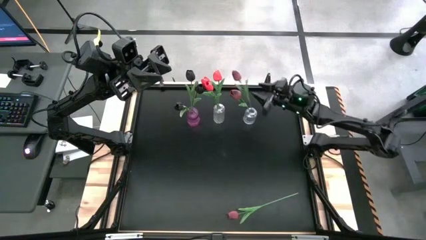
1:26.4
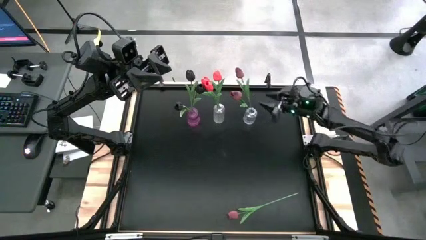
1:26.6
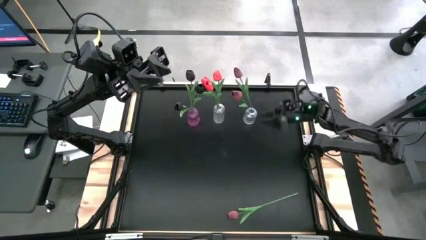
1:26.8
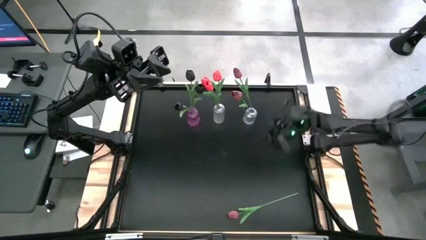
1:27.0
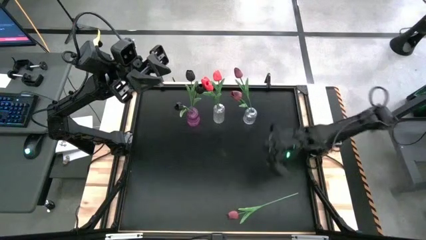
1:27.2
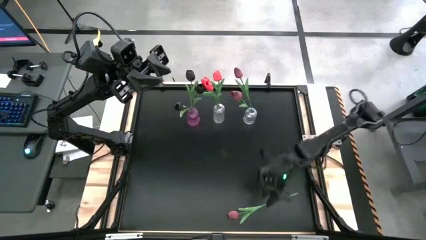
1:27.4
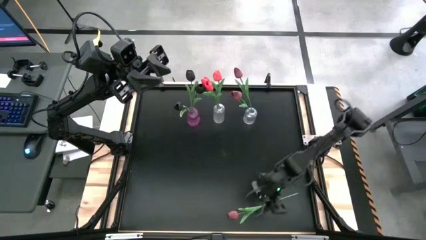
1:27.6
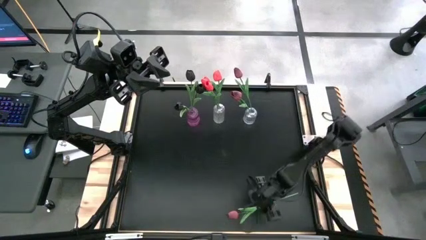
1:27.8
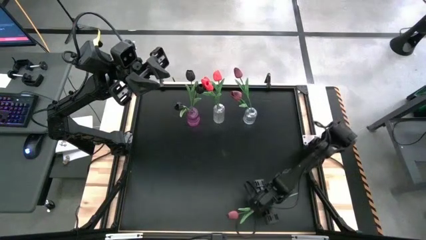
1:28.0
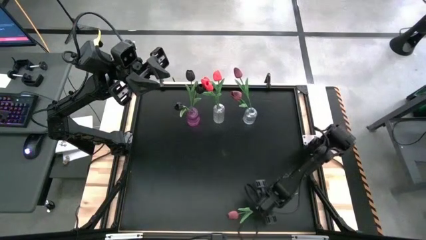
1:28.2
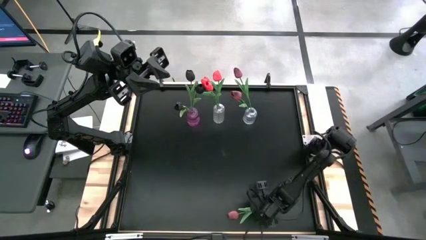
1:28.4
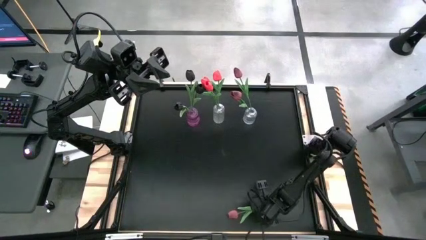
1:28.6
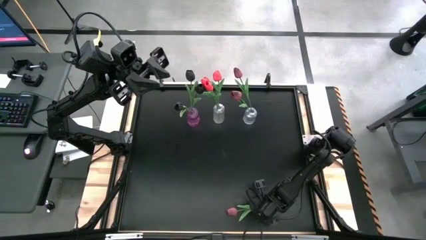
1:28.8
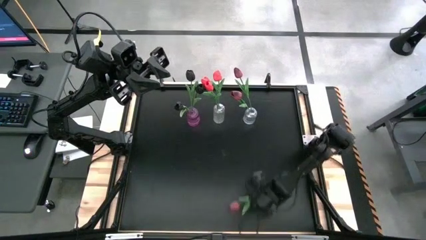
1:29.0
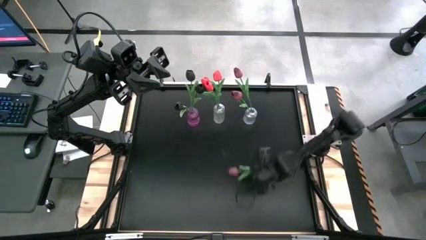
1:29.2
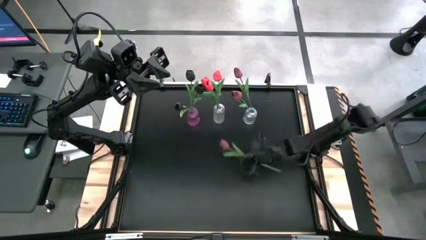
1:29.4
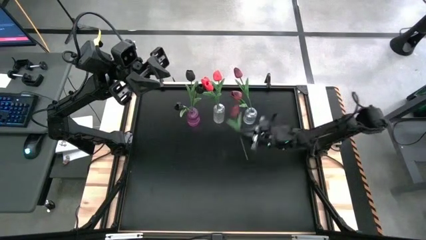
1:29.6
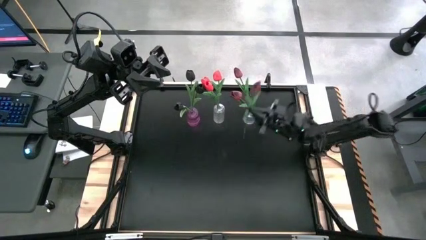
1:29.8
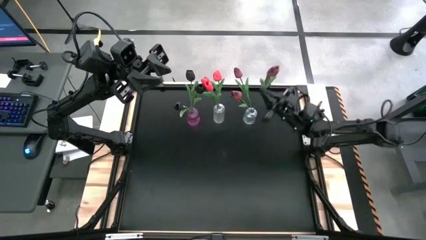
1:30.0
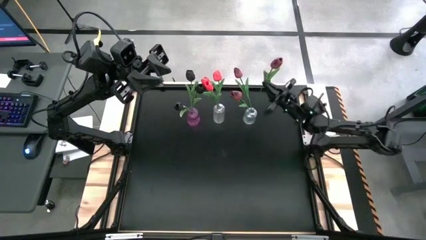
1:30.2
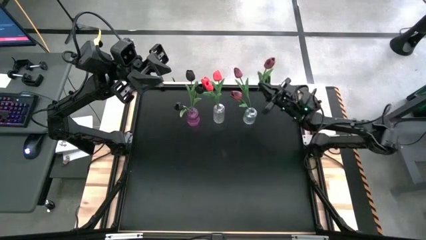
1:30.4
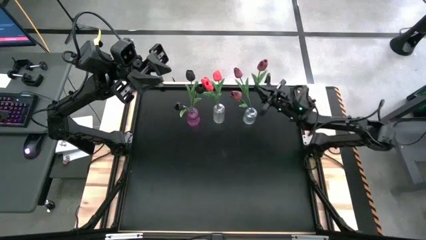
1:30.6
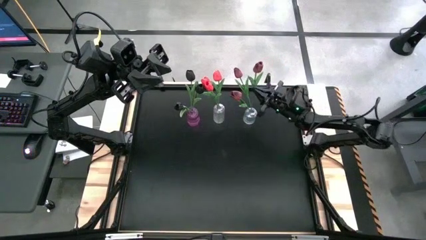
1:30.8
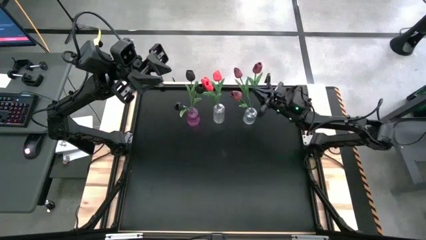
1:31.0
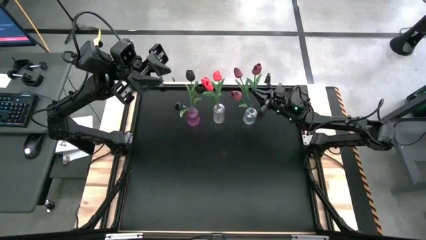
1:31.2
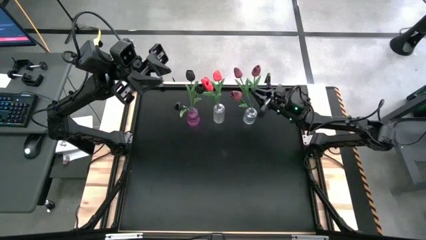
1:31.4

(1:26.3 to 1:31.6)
Task: Sort flowers into vase by color
Put the dark red tulip into the right transparent vase

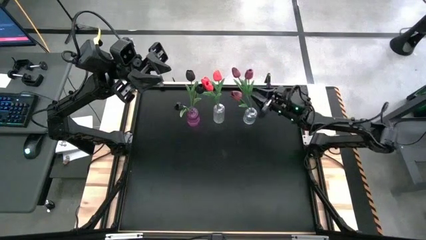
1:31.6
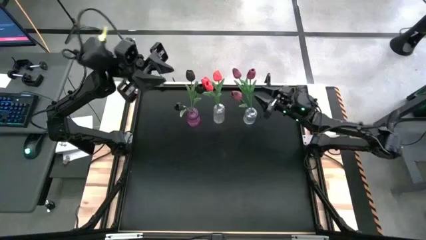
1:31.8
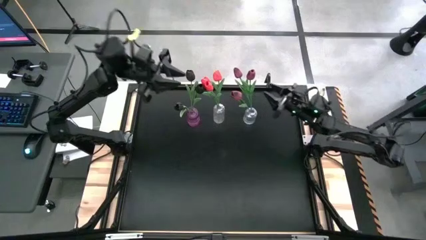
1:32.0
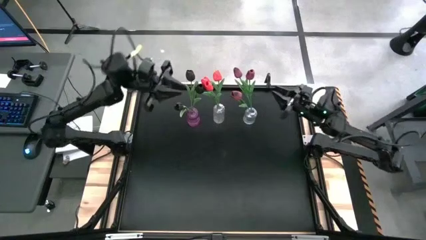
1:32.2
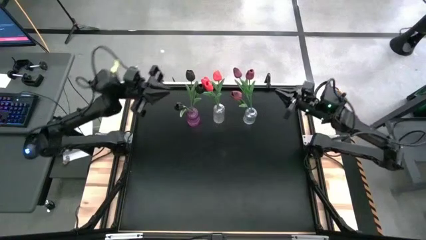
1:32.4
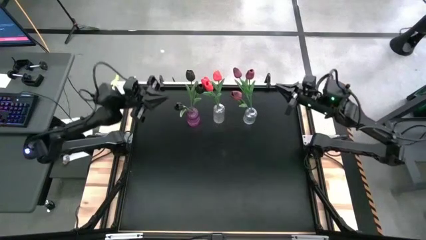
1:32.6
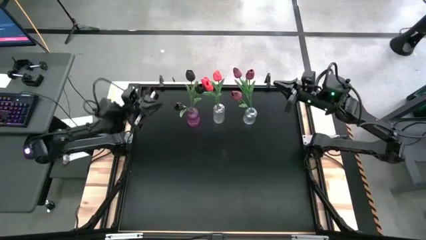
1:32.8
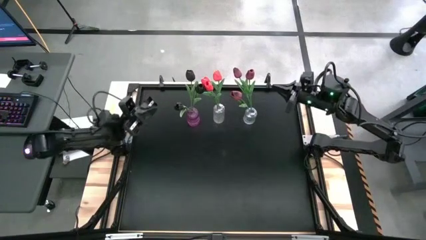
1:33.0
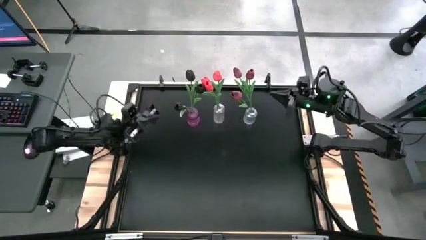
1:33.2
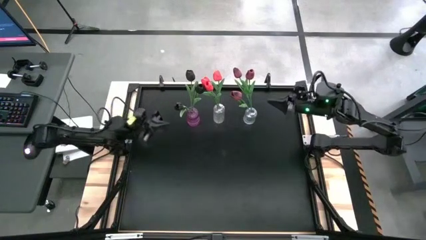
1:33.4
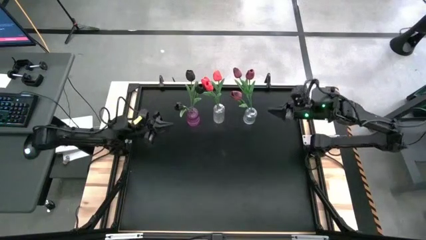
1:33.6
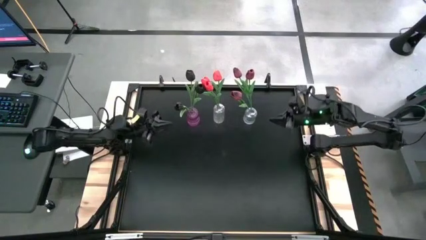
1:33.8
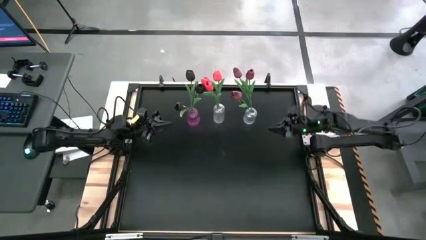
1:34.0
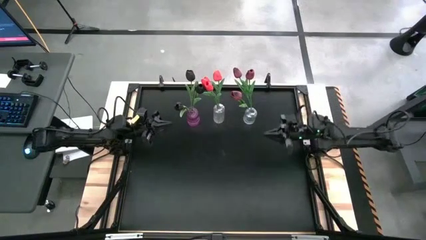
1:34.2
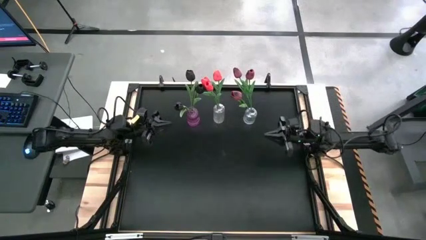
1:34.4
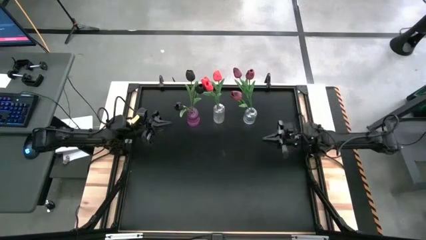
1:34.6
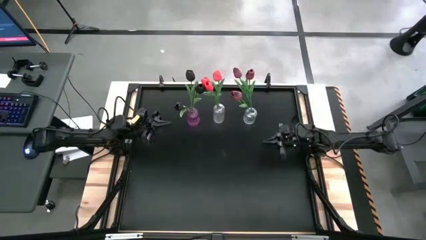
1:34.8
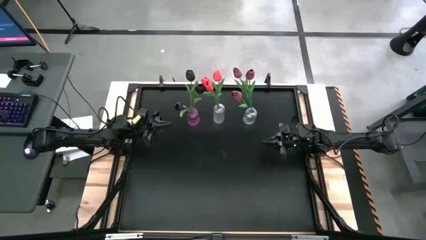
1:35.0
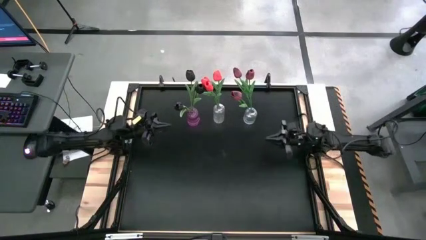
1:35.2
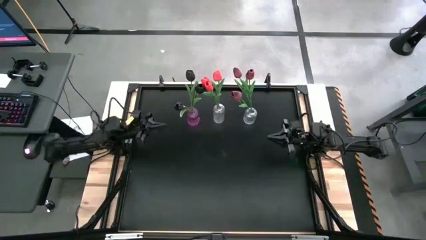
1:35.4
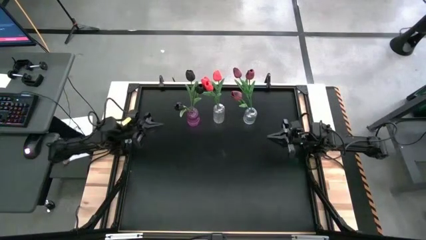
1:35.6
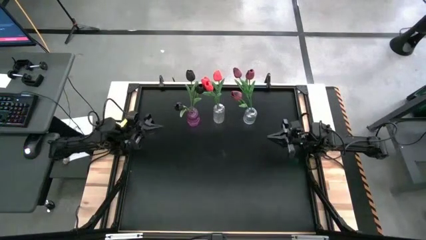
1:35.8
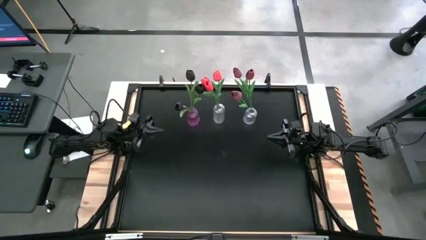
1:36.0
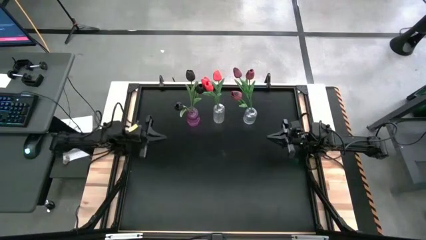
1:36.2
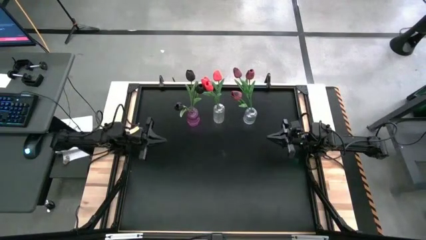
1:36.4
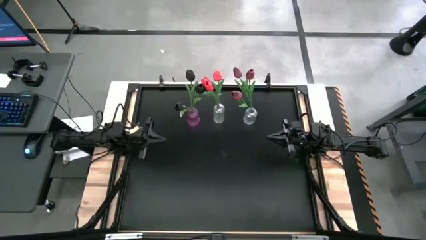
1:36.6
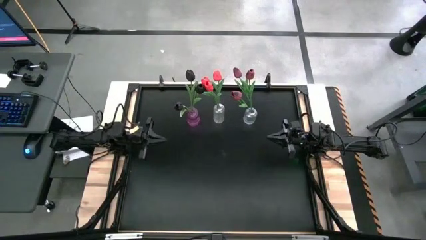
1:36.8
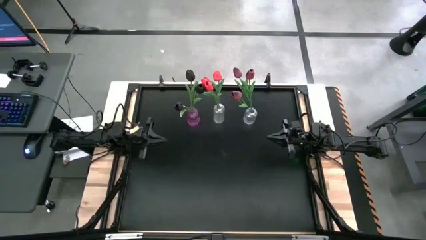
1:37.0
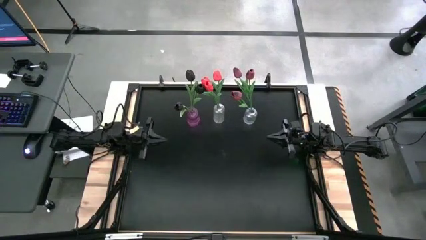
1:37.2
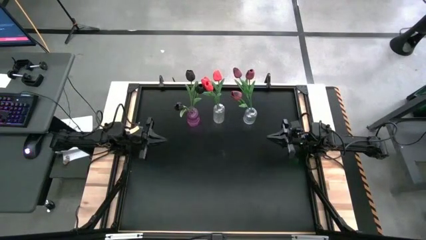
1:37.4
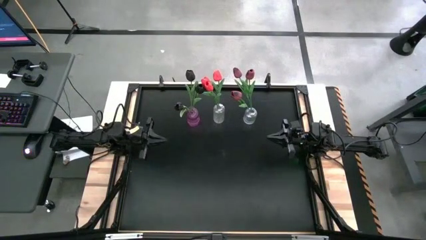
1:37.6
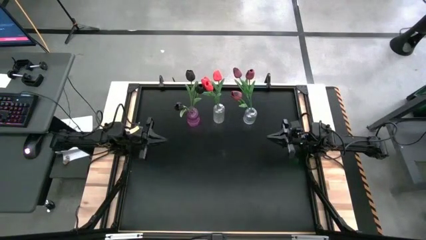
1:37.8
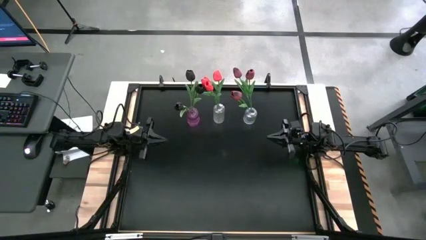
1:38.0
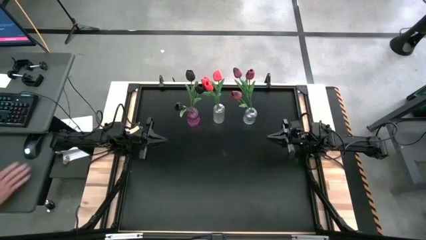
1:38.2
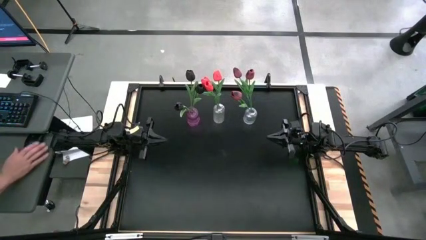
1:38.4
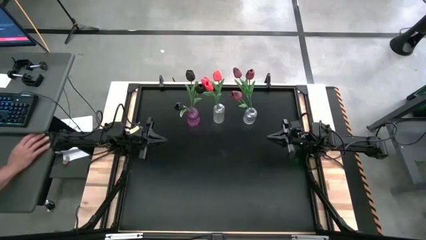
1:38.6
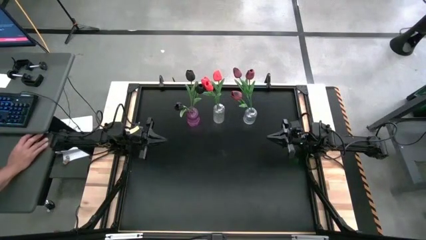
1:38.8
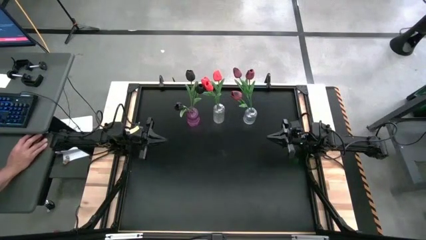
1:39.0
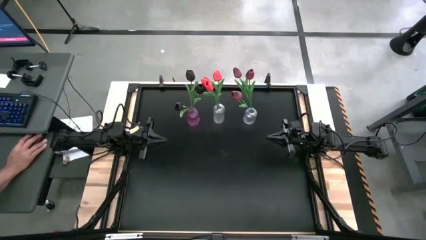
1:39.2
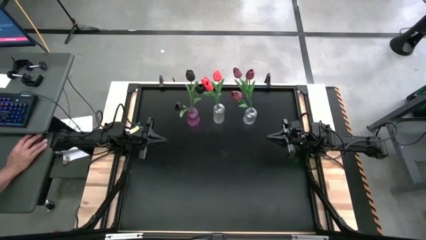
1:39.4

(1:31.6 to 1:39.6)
Return To Home Position
